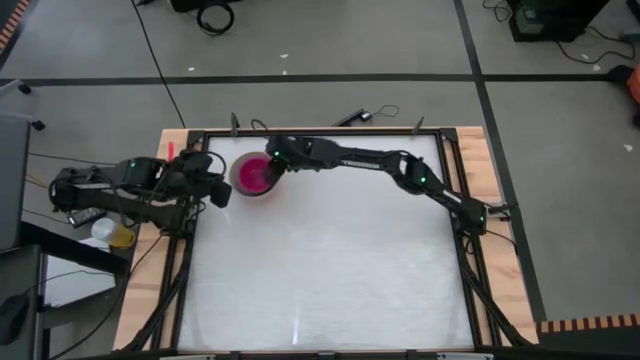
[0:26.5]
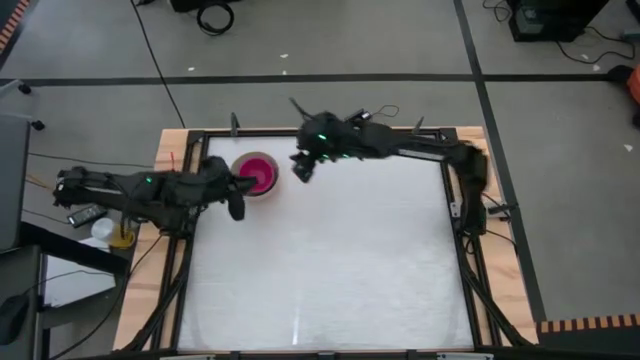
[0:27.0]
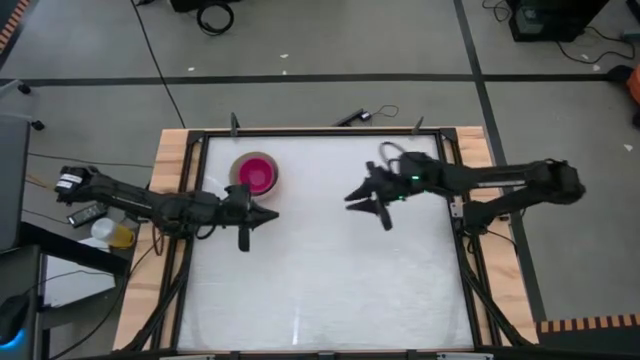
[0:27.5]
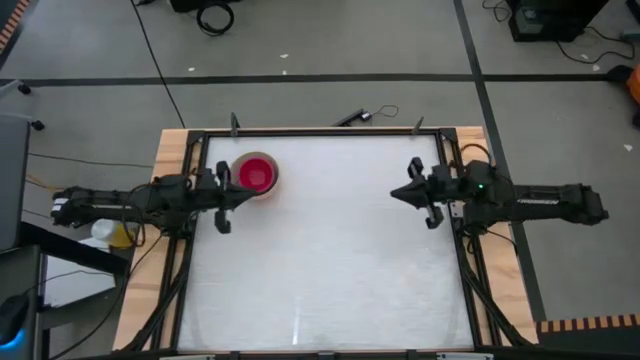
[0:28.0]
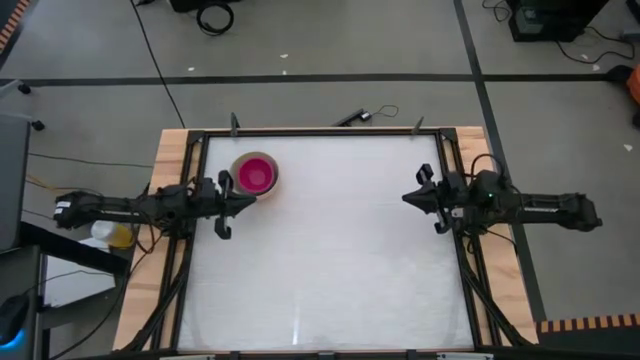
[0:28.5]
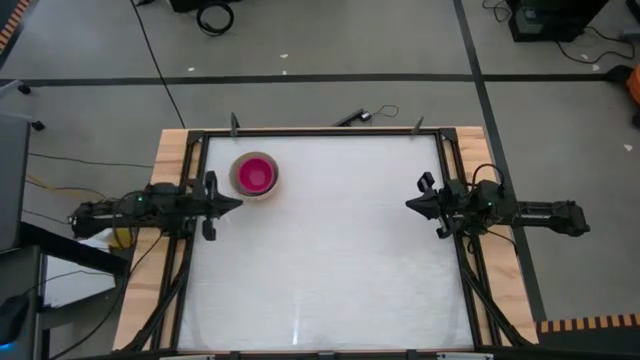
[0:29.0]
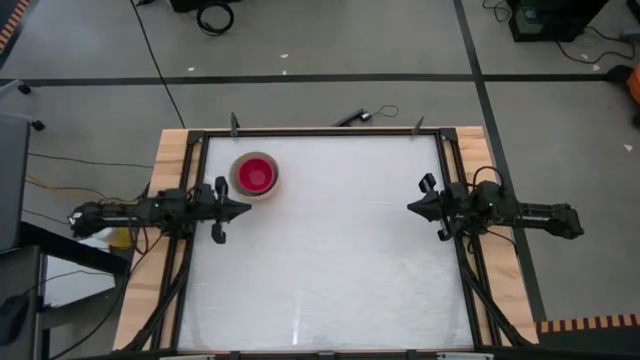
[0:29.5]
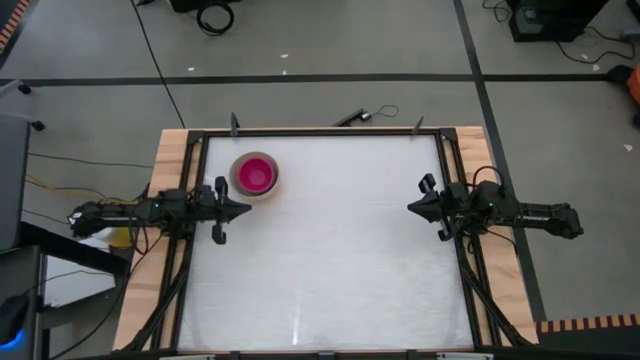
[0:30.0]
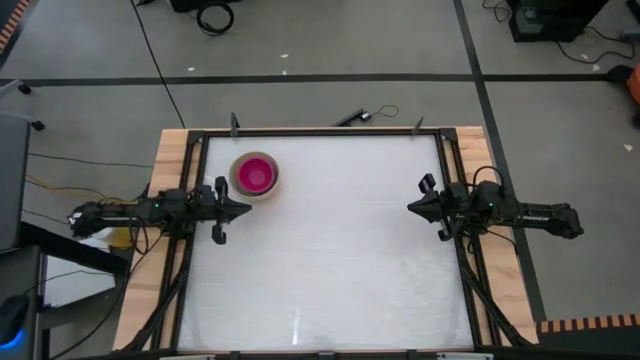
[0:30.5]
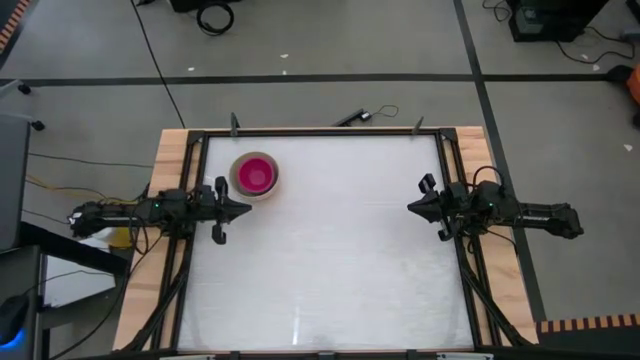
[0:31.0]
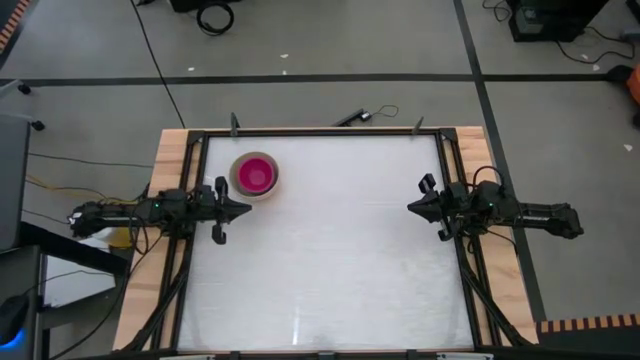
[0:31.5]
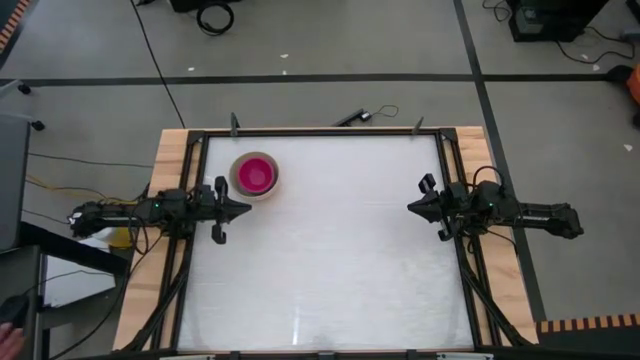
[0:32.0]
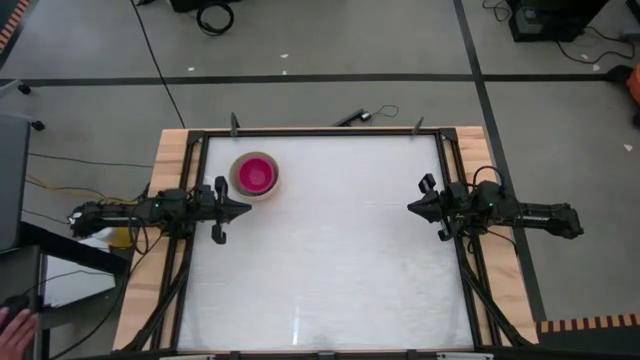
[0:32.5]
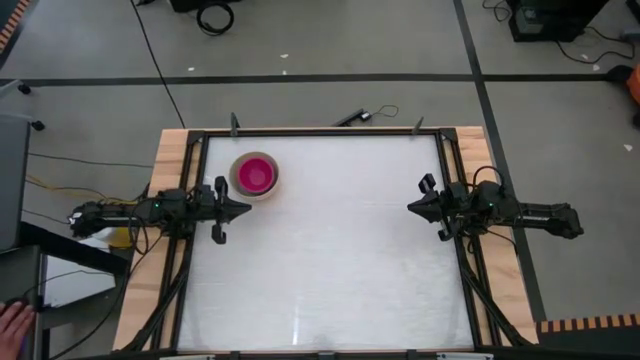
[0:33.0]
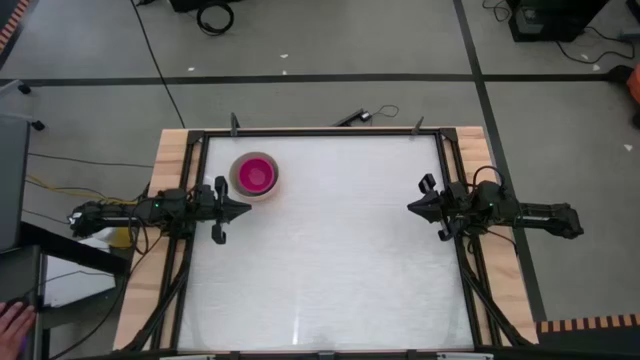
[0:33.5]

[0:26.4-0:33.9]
Return to Home Position
